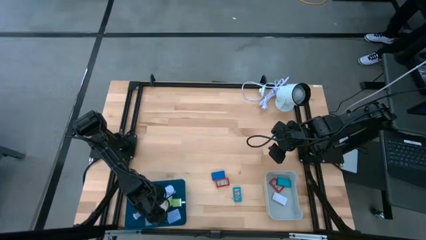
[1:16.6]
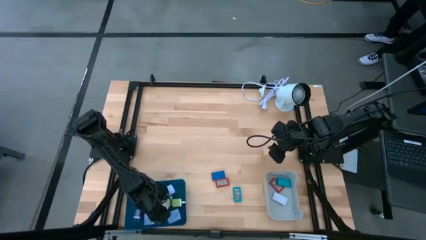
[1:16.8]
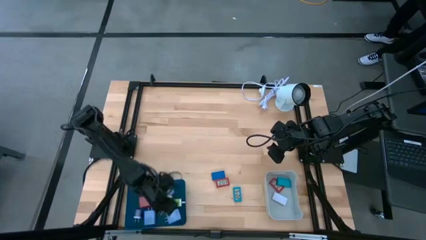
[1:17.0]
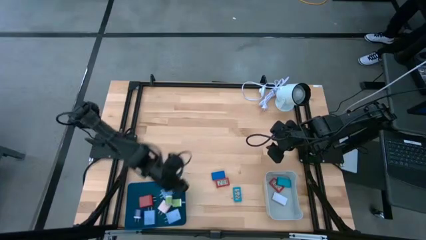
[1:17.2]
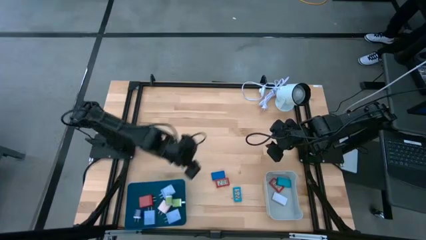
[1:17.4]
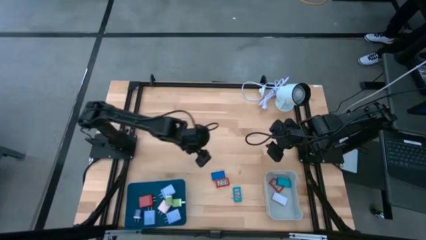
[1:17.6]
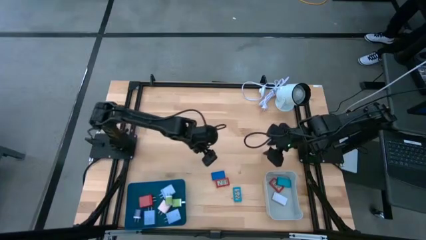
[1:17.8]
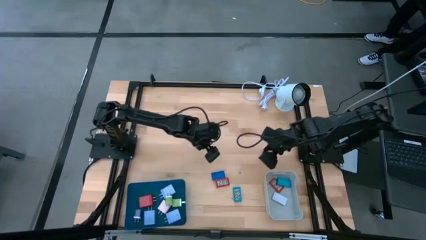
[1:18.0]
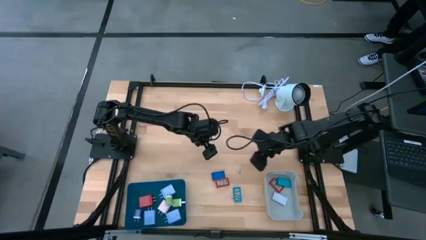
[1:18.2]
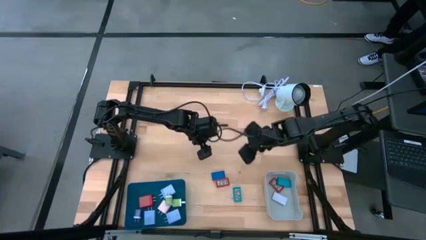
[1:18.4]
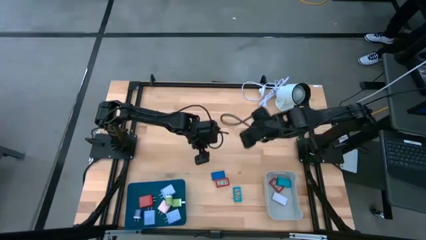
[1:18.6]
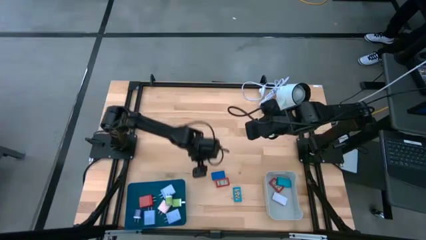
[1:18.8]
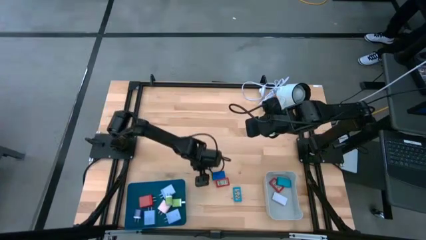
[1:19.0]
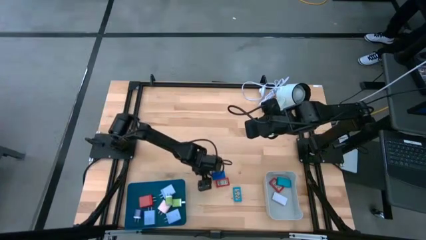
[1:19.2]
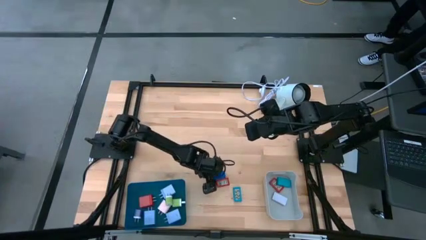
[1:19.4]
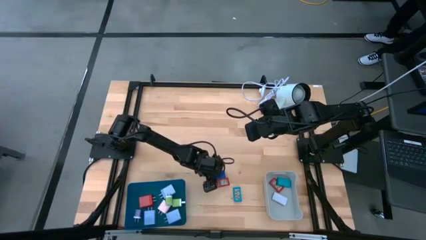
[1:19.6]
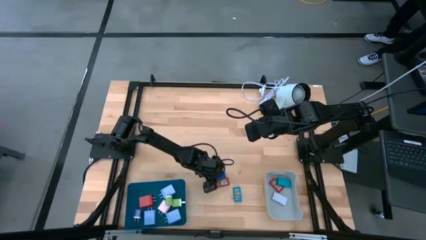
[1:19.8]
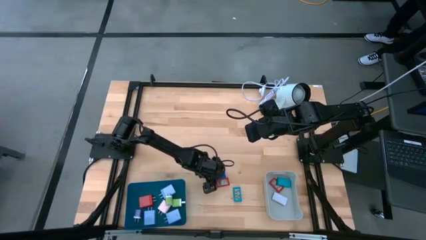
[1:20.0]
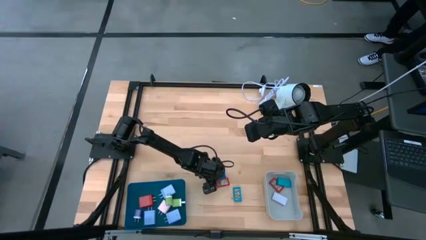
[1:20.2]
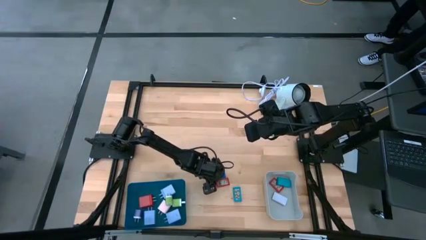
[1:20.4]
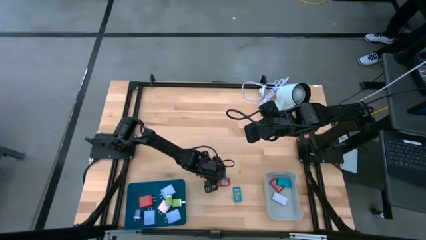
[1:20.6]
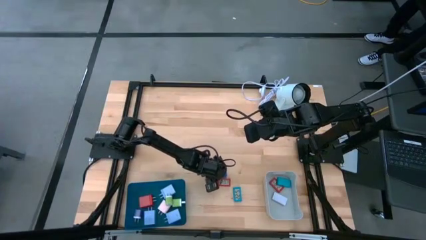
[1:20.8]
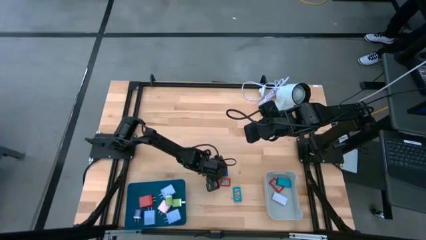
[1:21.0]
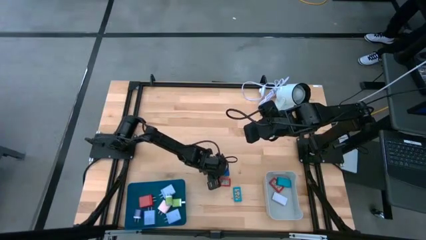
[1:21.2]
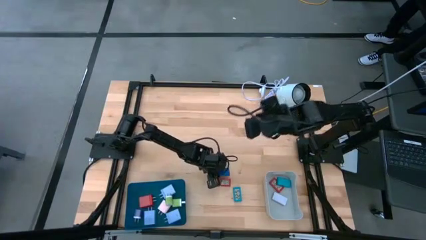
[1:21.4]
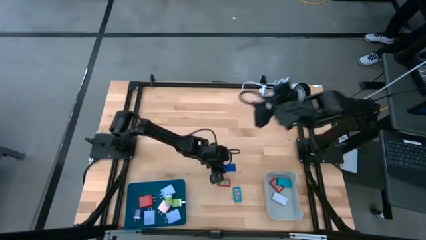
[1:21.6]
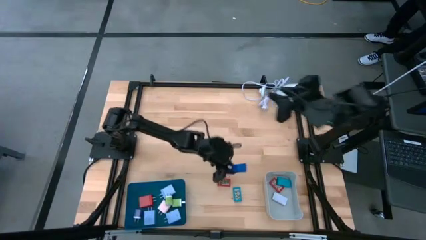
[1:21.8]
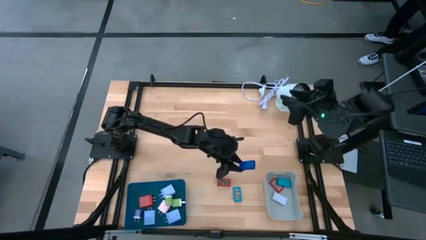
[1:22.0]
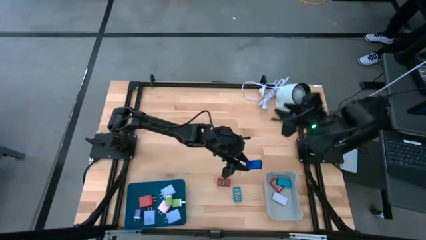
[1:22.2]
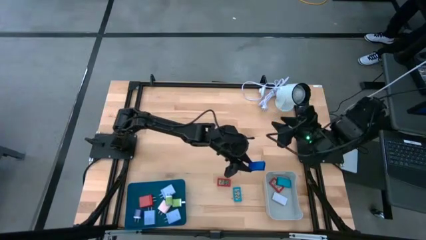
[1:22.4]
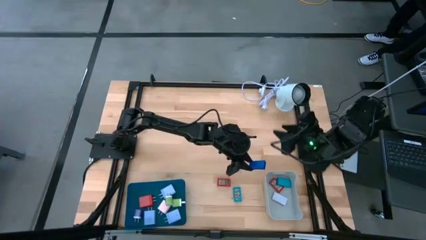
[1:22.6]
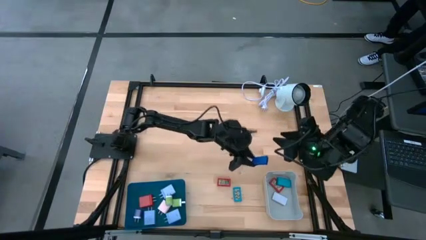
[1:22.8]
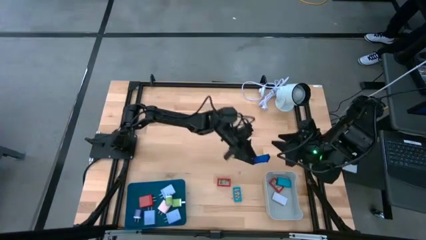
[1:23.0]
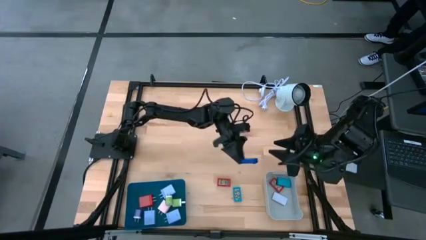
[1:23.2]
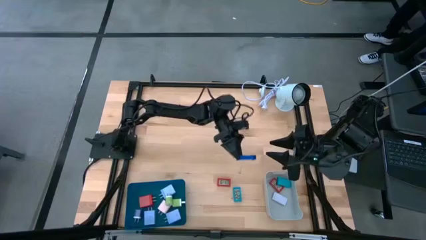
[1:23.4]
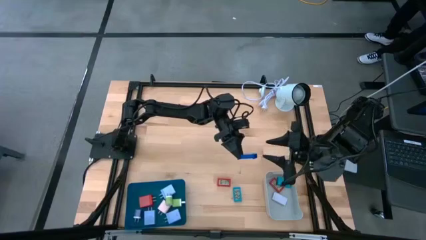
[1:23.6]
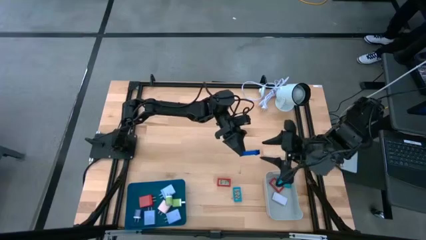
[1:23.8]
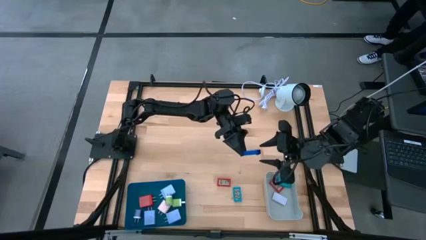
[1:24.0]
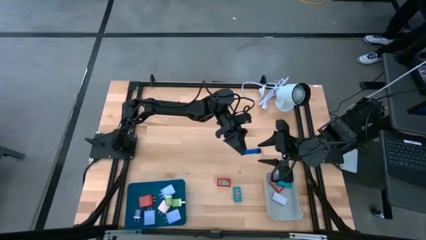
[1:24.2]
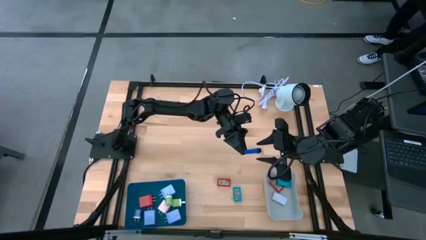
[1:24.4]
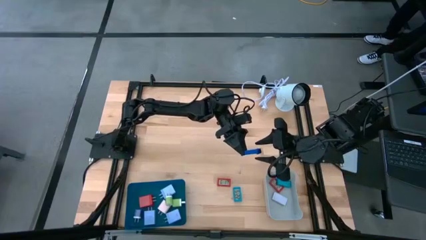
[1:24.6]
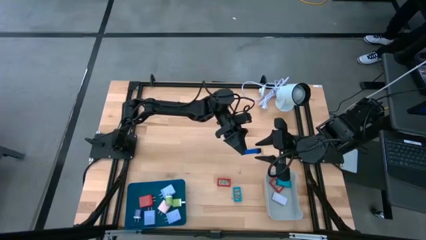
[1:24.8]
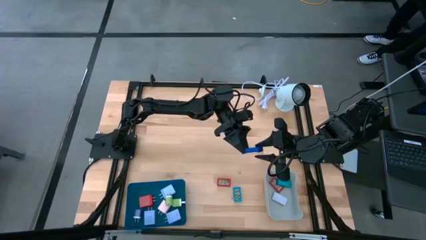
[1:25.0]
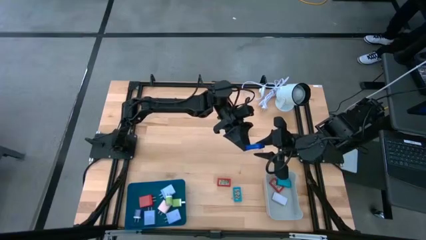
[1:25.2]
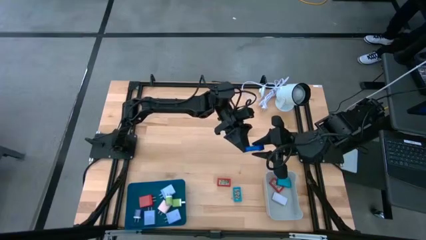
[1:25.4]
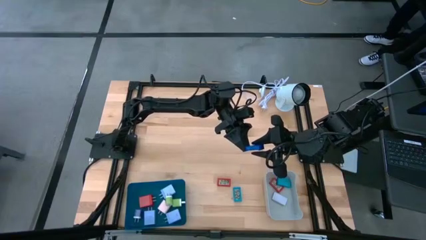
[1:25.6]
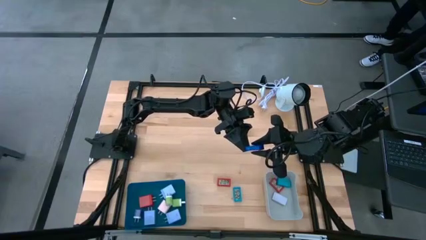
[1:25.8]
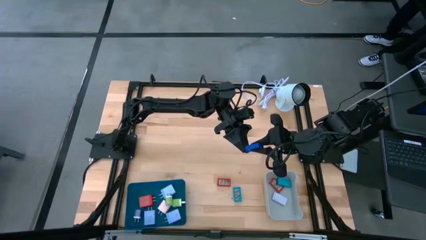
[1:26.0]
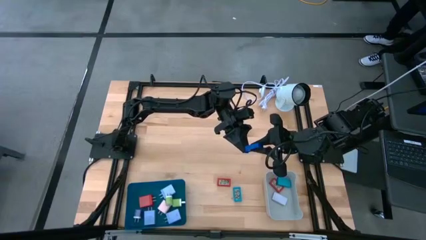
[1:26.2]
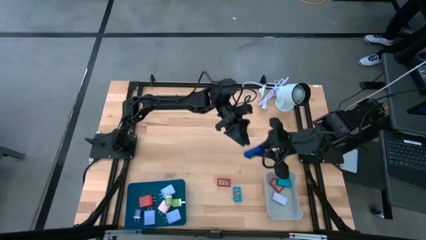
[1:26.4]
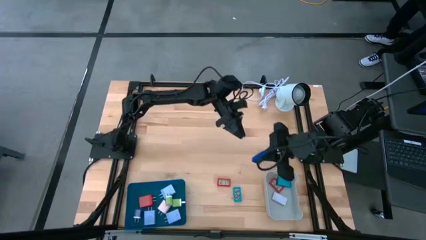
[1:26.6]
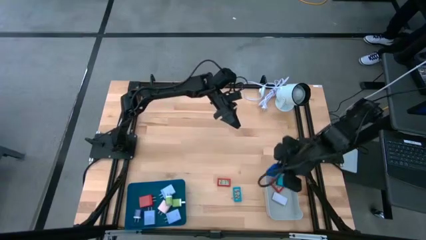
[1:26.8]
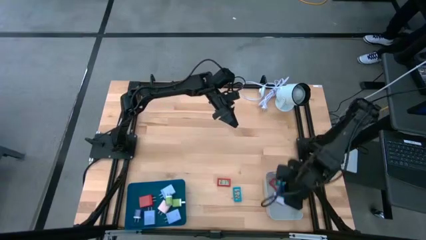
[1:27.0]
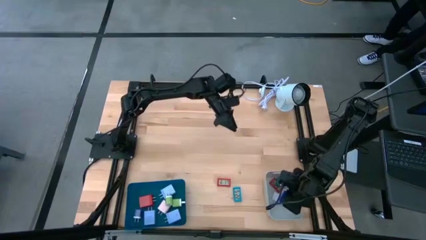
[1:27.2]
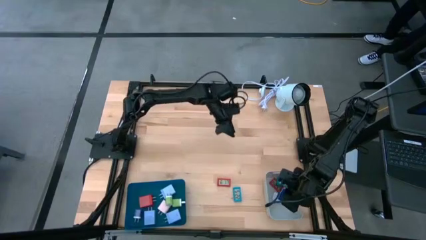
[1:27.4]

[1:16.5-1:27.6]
Task: Pick & Place Office items
Put the blue digital clock into the gray bin

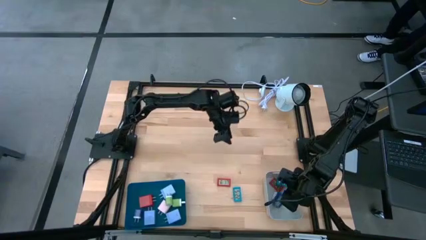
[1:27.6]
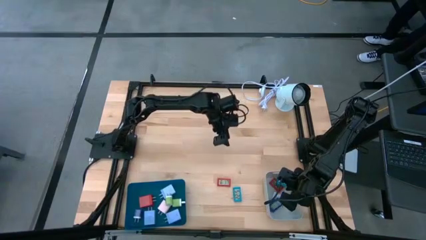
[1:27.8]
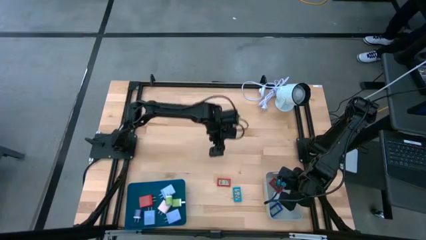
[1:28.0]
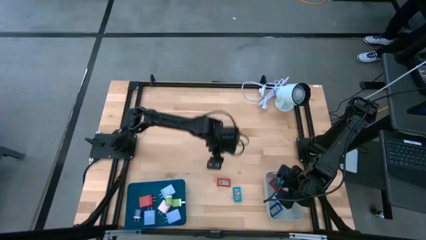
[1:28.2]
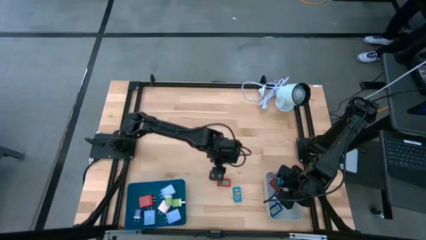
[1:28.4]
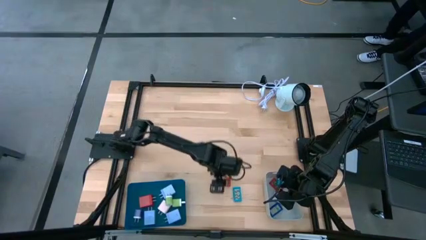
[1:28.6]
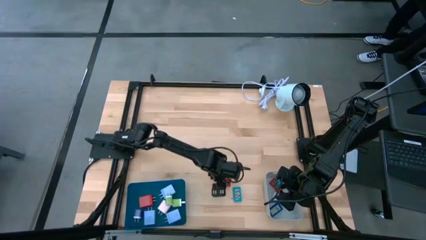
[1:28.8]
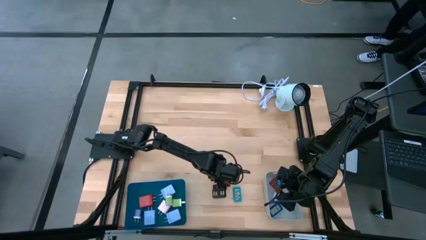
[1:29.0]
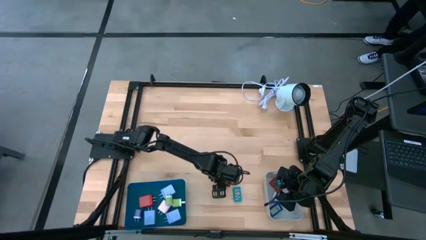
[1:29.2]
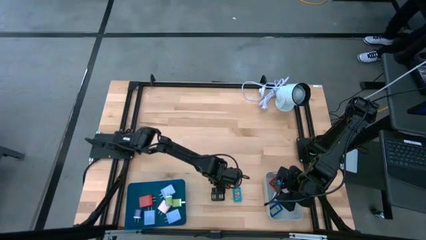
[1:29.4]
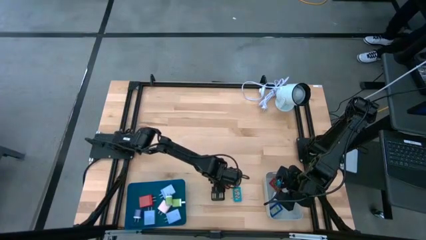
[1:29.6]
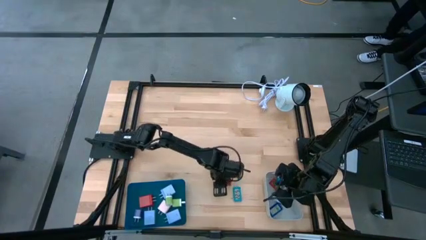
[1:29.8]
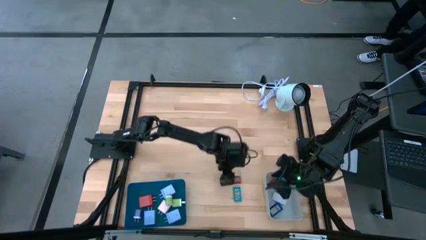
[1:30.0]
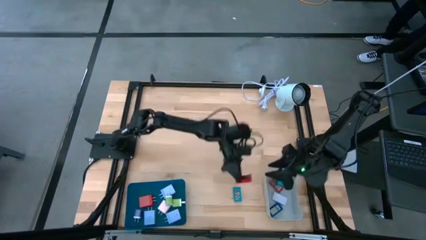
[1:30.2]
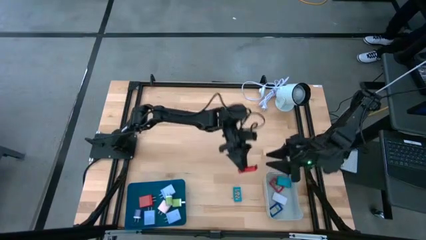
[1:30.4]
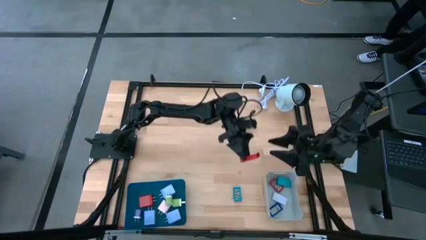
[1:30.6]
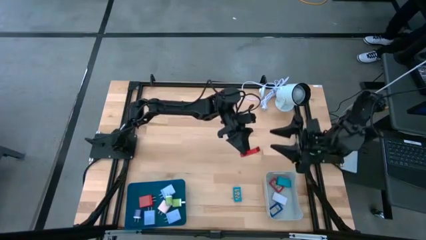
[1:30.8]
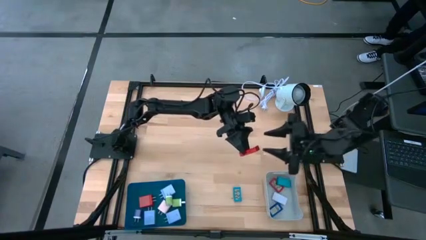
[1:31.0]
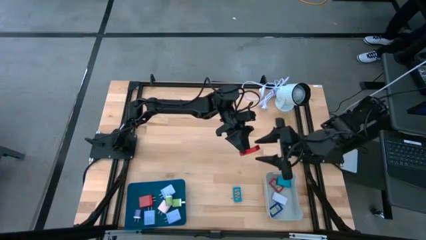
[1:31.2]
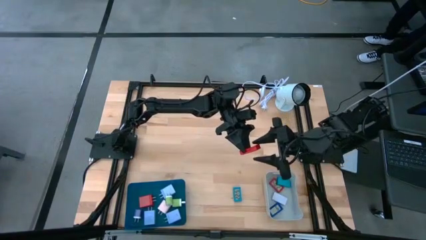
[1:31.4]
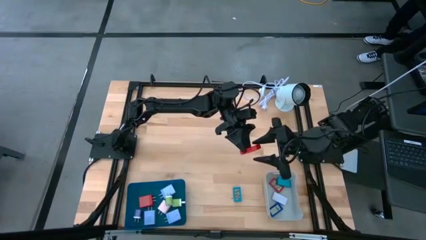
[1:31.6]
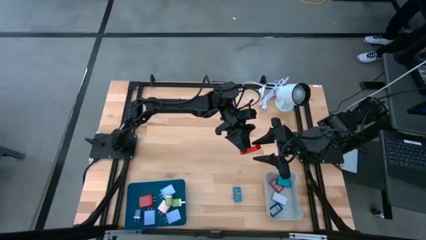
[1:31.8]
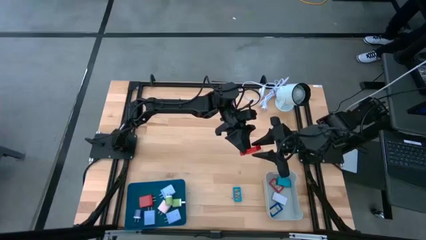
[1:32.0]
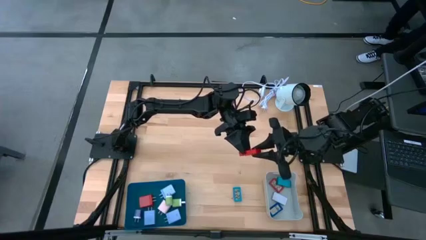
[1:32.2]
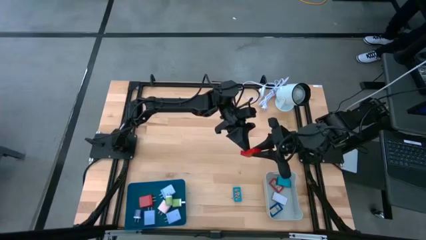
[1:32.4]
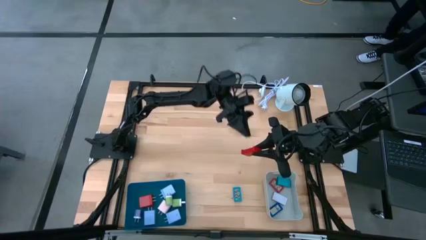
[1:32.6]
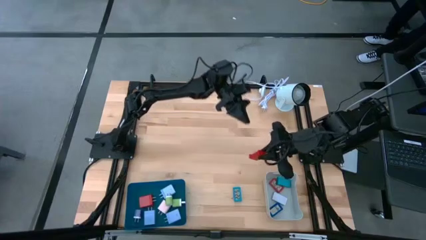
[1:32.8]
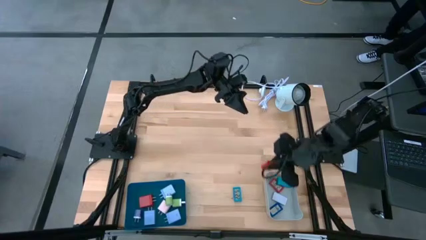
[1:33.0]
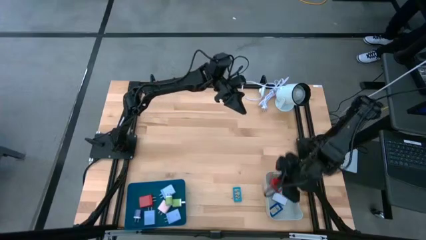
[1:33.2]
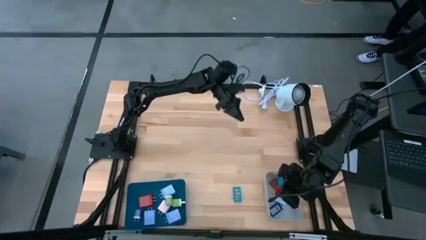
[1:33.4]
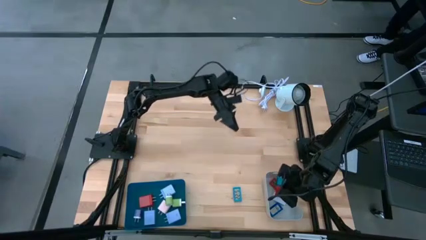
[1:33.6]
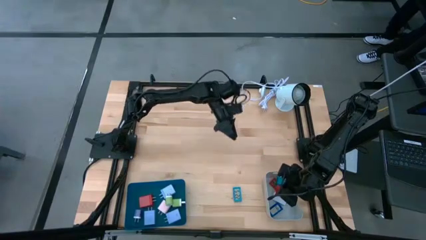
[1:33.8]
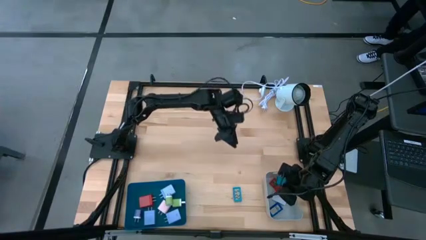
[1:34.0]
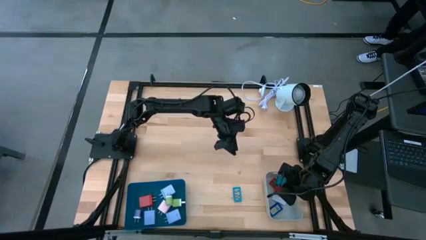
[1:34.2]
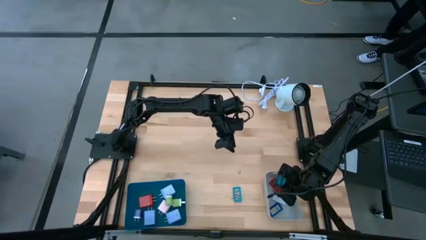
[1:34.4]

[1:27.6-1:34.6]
Put the red digital clock into the gray bin
